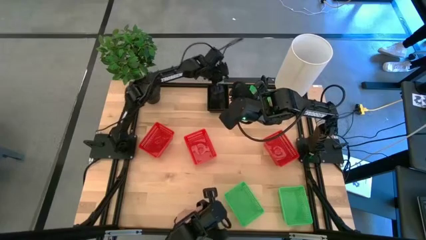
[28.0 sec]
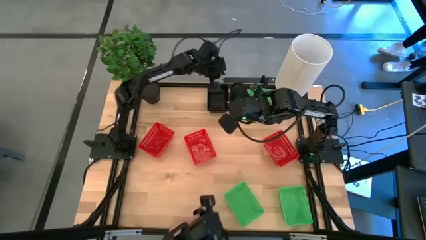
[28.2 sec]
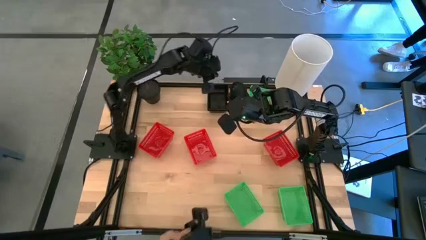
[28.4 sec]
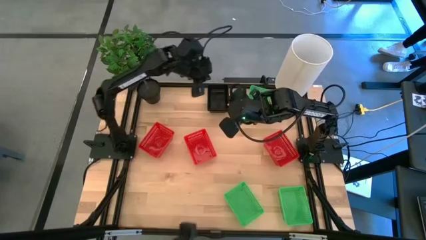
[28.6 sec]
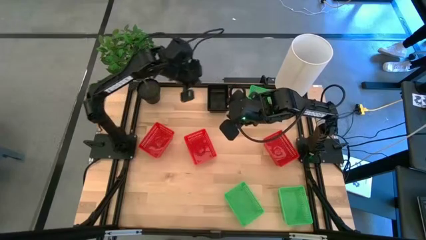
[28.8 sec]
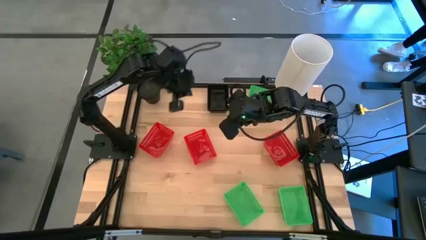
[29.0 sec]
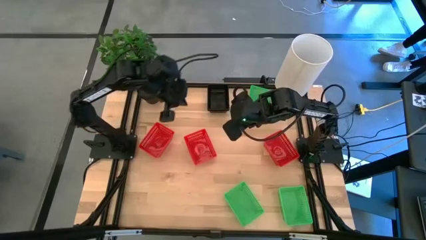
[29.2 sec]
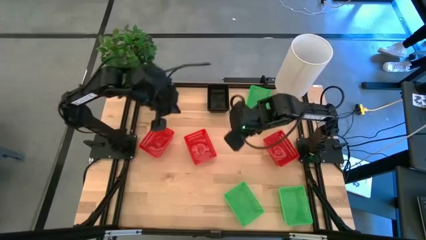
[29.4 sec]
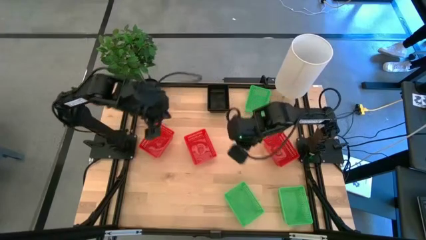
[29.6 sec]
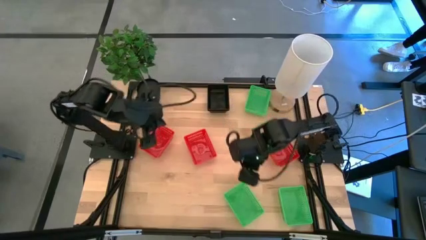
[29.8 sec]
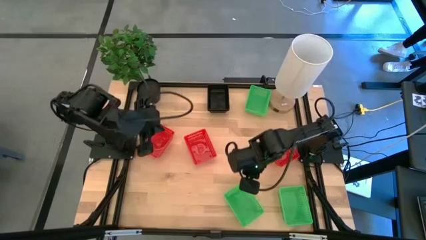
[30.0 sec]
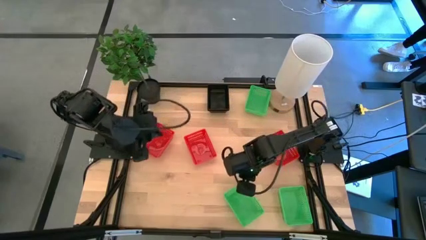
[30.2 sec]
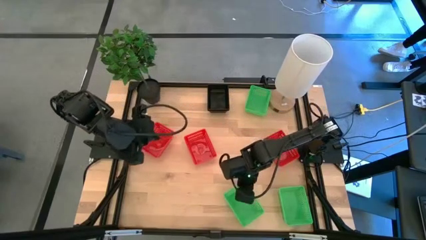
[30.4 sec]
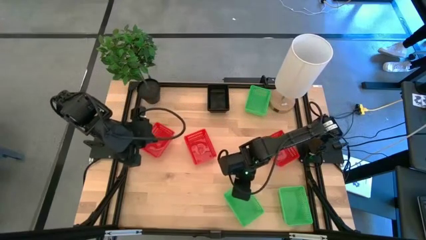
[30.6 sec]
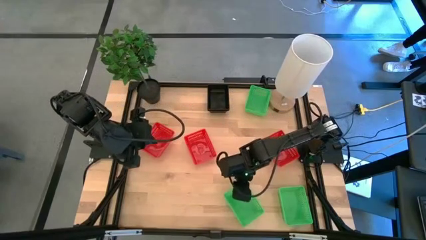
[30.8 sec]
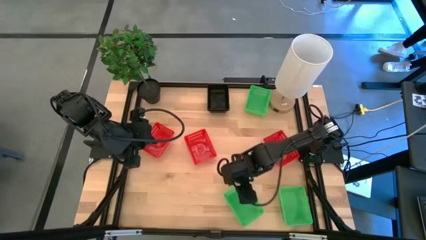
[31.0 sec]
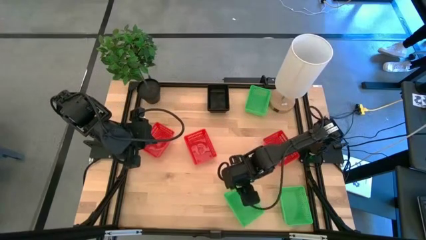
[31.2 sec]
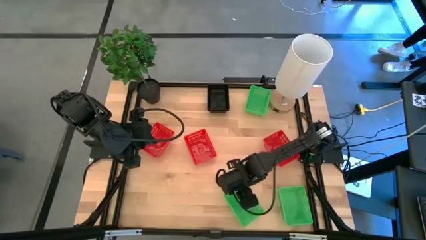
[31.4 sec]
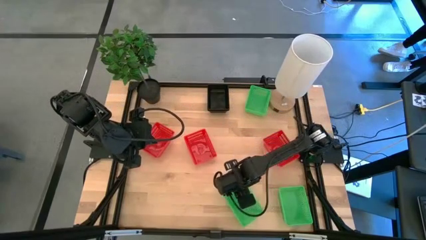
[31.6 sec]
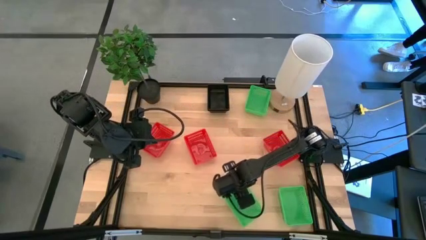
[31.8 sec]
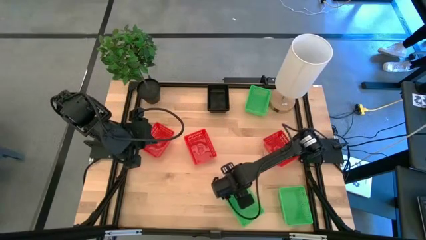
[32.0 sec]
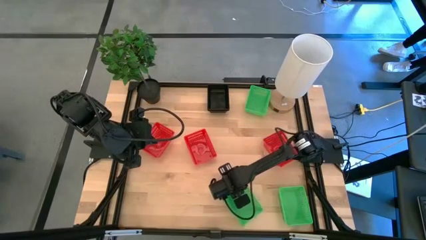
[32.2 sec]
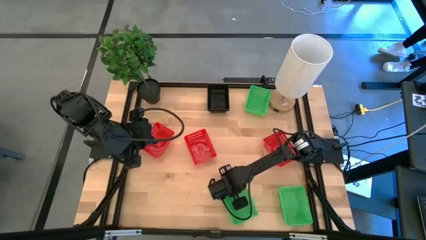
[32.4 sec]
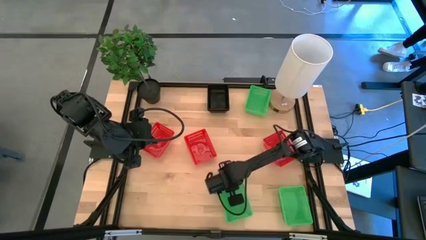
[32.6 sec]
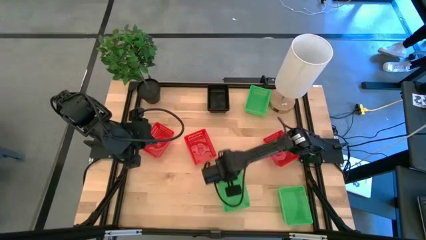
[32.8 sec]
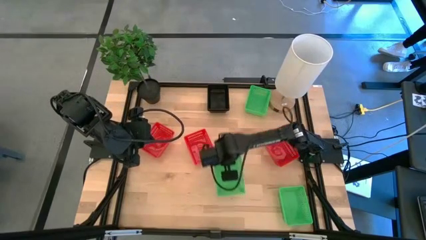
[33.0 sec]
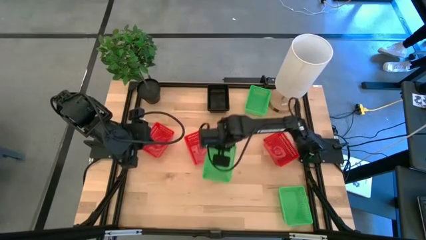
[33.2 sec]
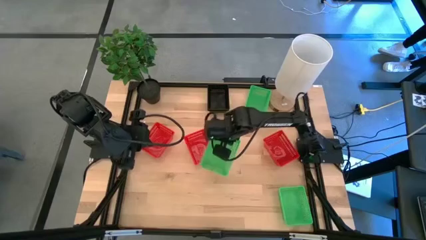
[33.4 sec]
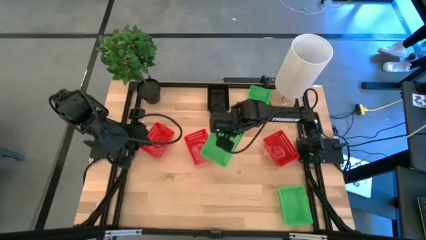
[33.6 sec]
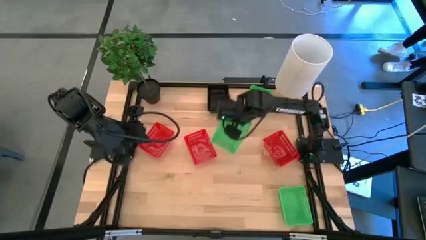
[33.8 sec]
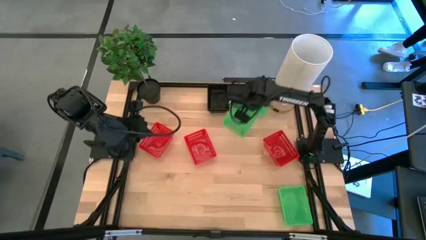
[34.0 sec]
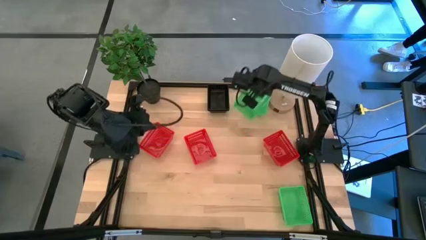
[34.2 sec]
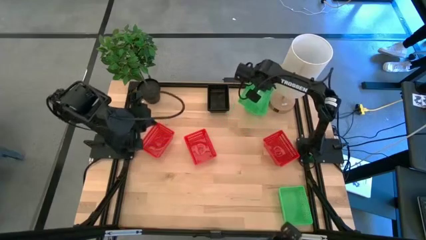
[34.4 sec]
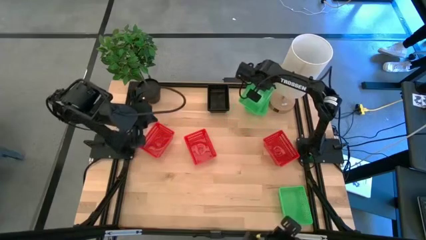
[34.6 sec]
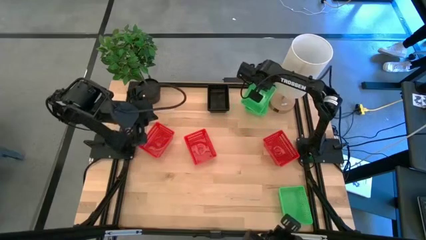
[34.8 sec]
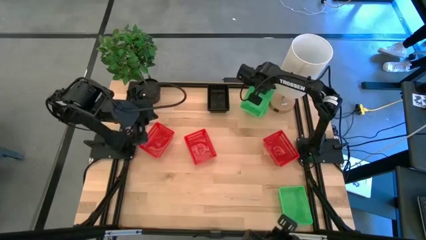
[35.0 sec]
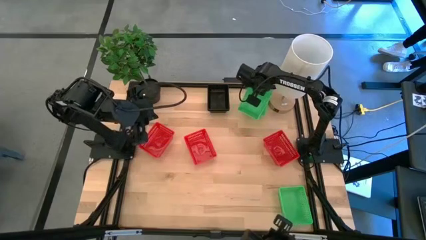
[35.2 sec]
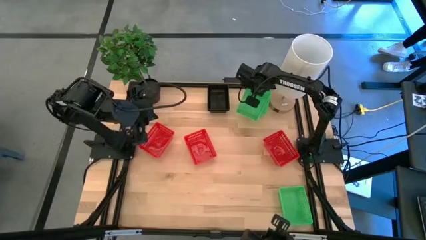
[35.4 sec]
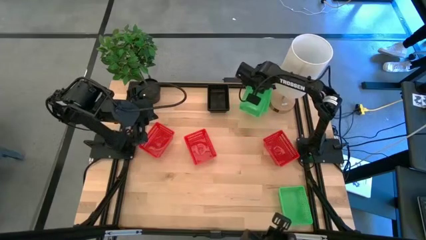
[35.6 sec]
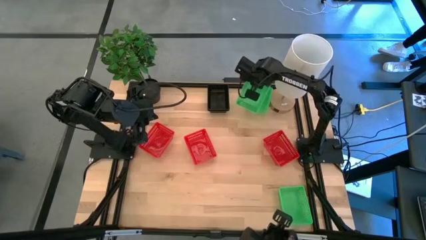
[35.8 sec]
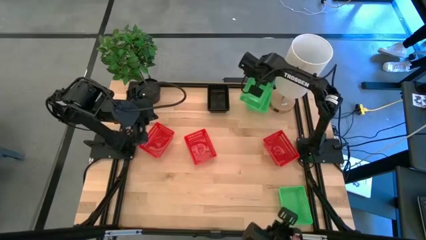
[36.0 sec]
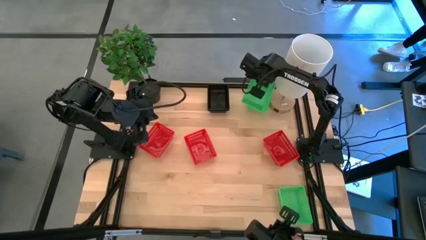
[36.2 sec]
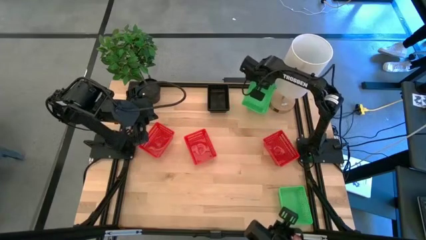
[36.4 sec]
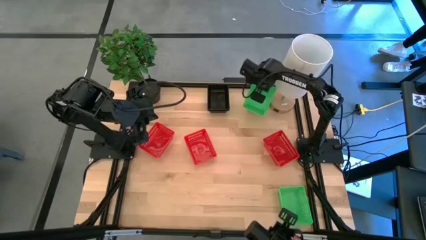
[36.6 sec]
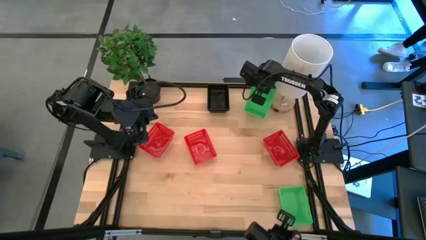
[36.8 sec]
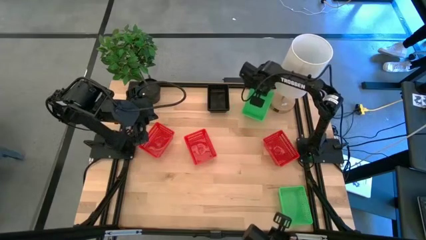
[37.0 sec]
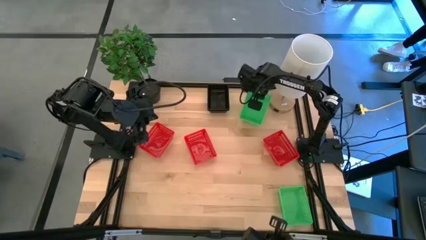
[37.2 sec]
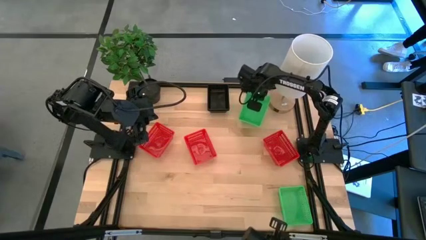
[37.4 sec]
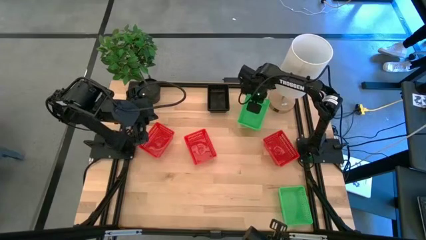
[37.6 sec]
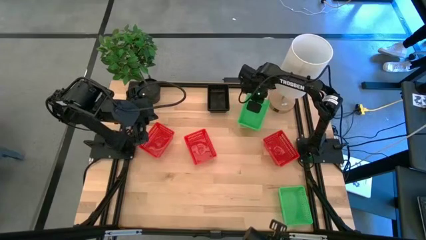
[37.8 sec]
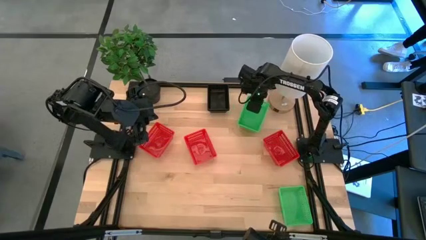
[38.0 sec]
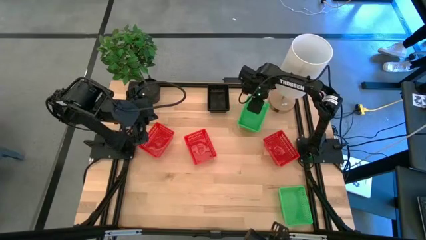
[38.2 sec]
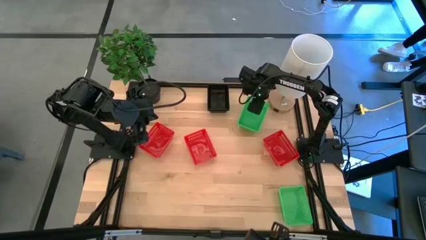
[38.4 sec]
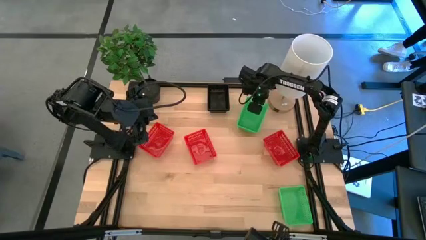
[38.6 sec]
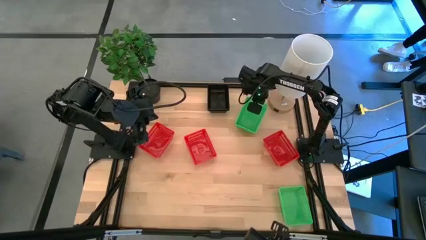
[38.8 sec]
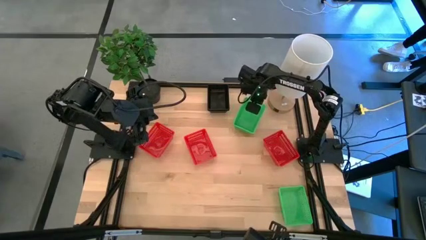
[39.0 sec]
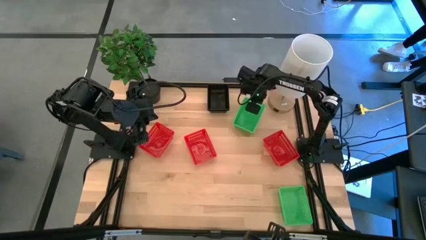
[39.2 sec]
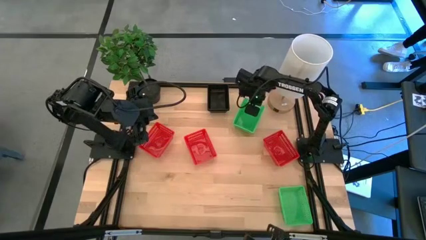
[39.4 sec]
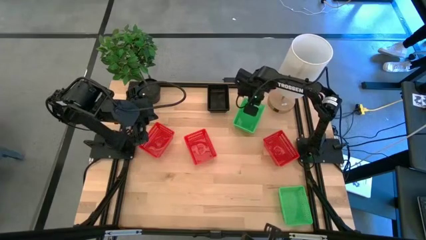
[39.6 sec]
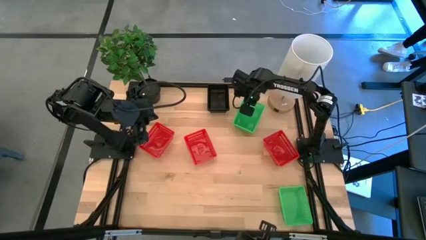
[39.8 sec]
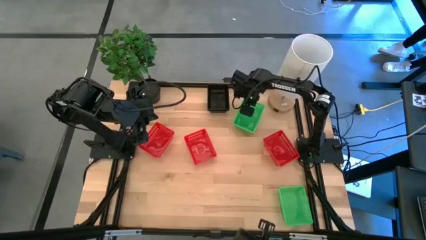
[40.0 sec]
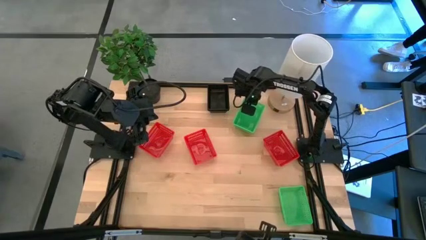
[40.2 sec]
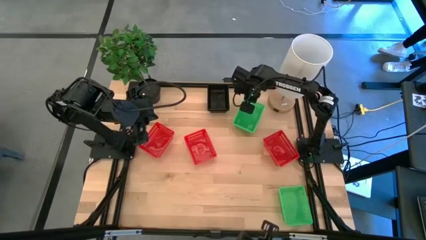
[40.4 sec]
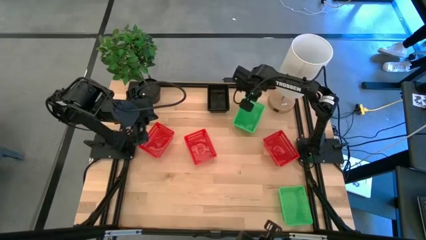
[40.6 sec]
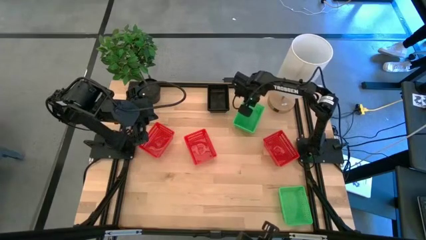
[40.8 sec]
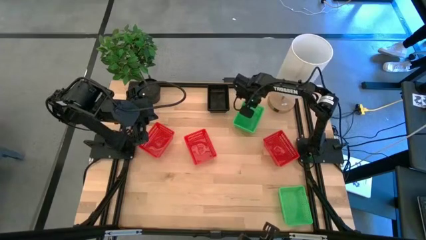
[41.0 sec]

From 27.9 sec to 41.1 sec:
Stack the bottom left green bin on the top green bin
